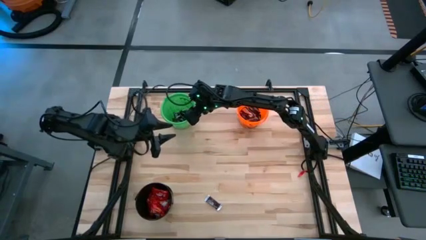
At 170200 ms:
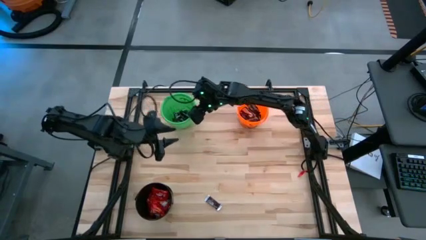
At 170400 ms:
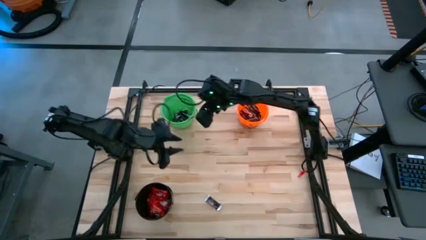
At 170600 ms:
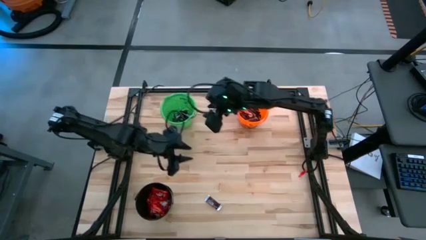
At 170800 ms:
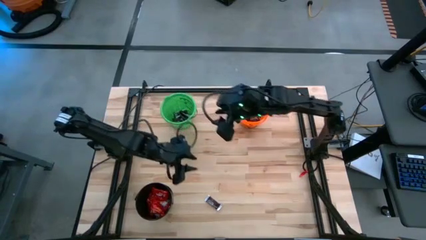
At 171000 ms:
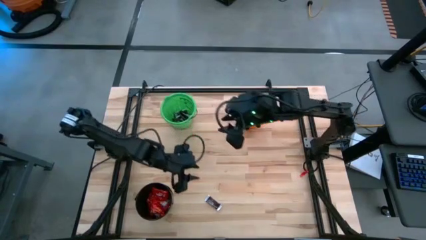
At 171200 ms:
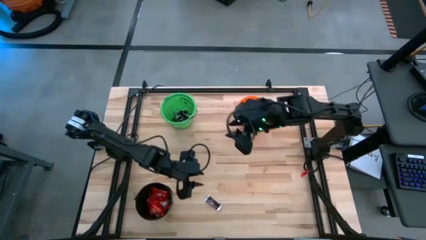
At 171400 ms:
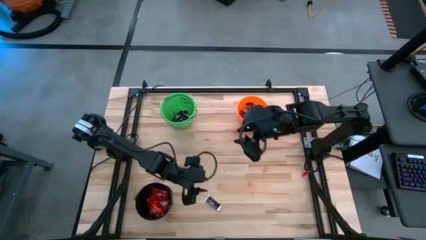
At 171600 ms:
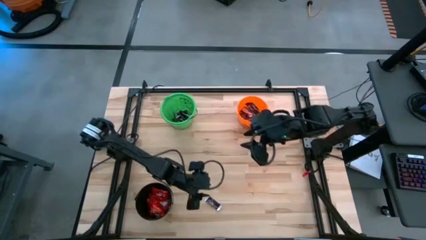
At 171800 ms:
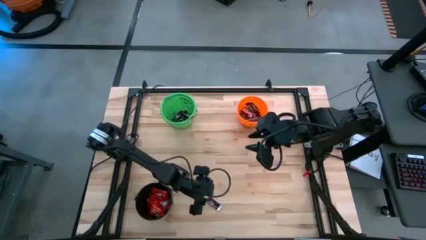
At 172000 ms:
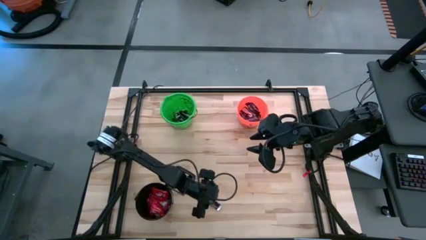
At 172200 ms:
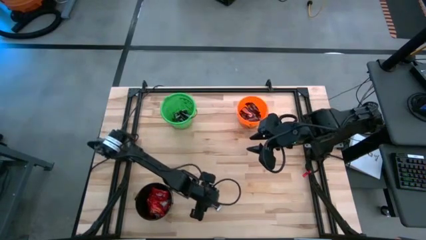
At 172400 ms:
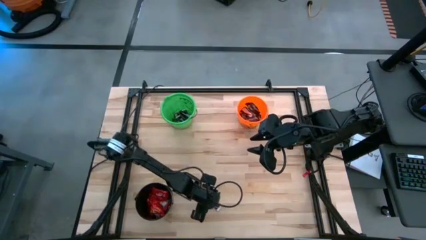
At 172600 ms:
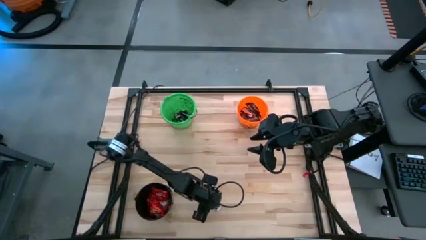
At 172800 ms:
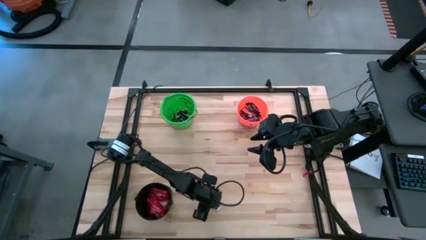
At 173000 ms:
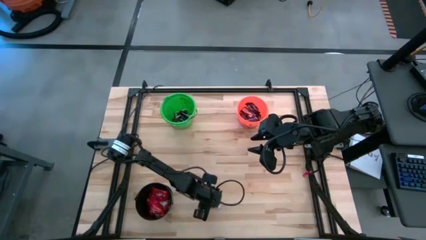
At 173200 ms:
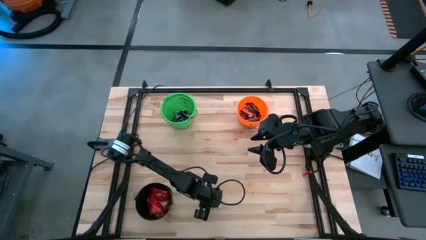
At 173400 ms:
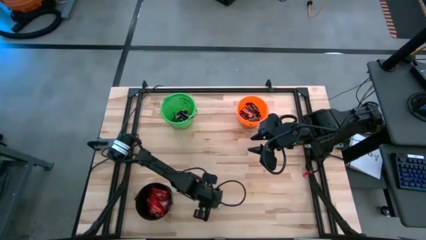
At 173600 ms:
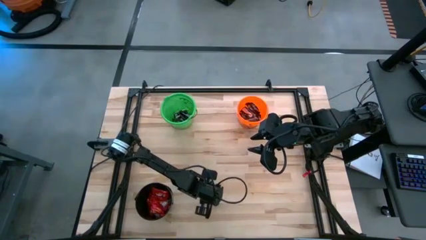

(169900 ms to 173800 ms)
Task: Sort candy
Put the black chocolate into the green bucket

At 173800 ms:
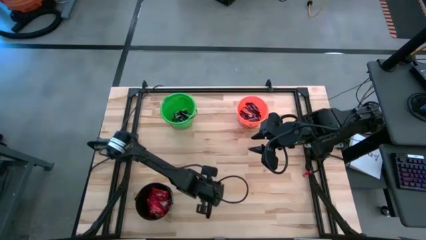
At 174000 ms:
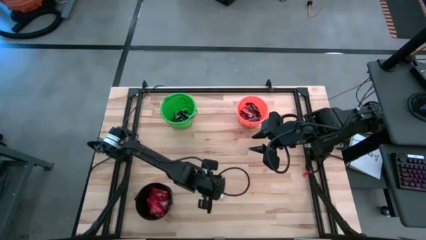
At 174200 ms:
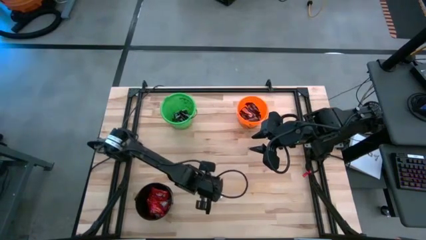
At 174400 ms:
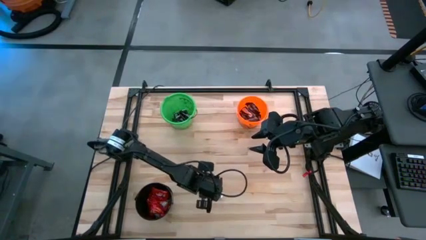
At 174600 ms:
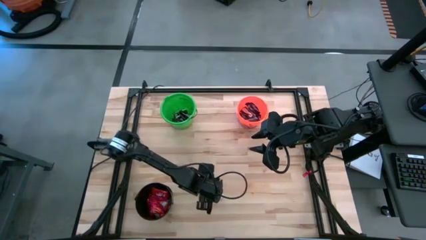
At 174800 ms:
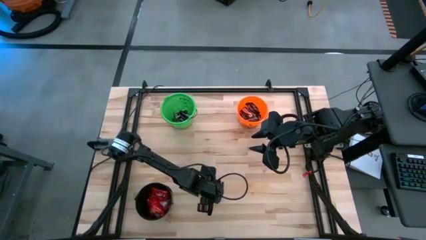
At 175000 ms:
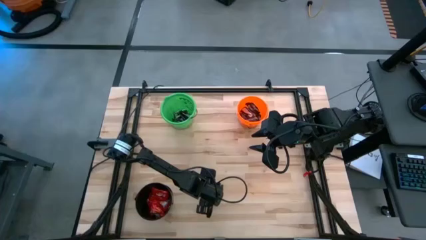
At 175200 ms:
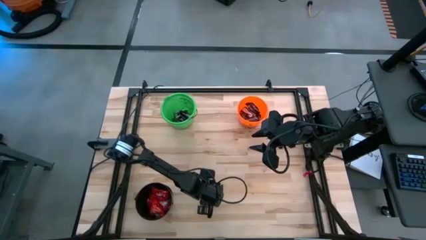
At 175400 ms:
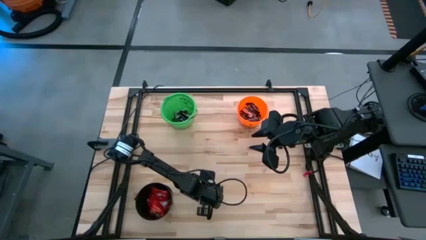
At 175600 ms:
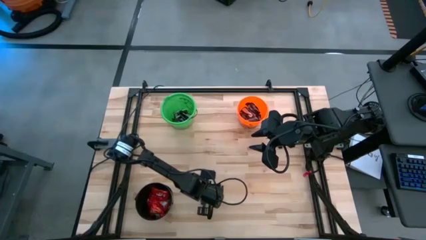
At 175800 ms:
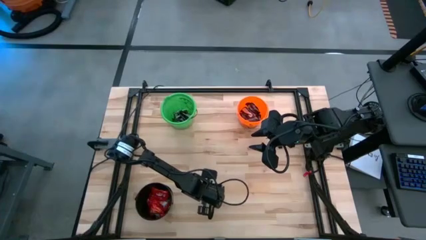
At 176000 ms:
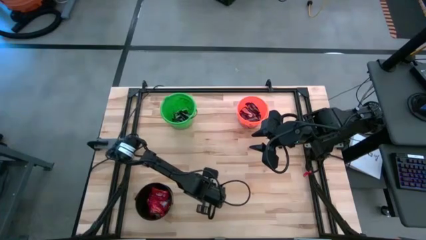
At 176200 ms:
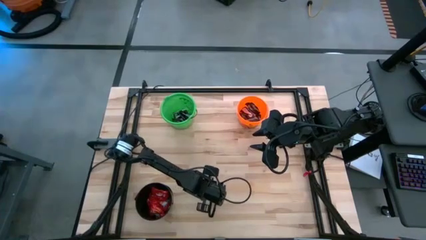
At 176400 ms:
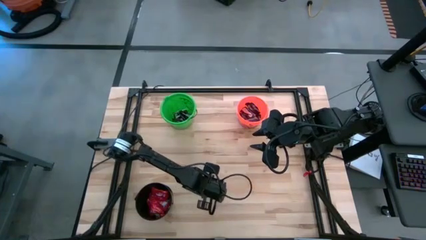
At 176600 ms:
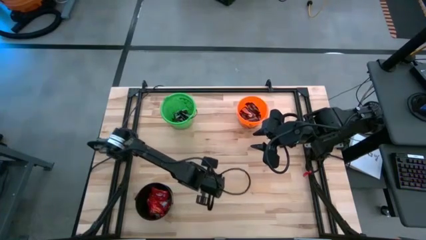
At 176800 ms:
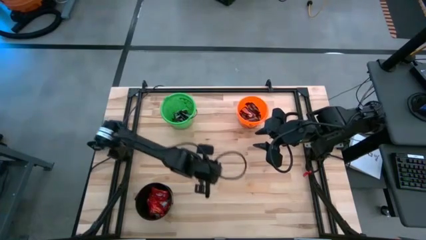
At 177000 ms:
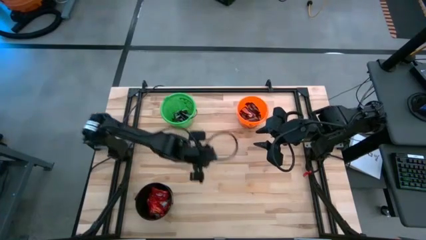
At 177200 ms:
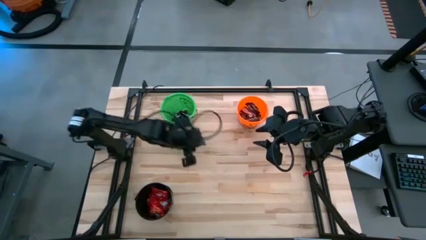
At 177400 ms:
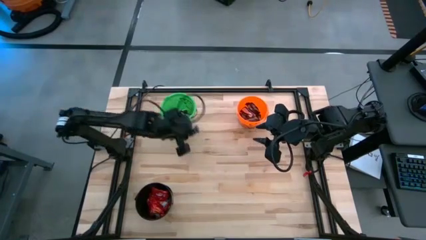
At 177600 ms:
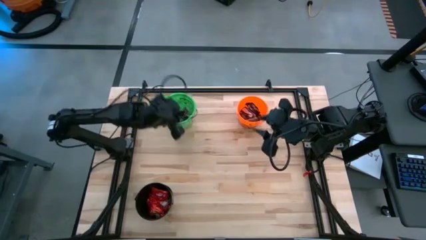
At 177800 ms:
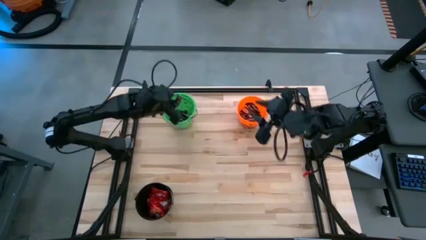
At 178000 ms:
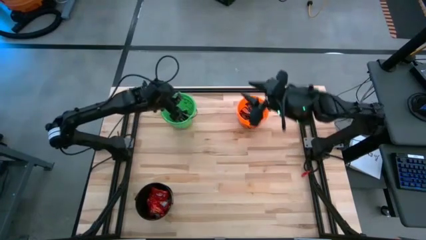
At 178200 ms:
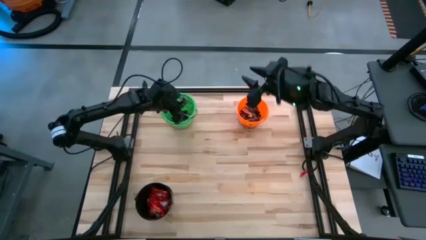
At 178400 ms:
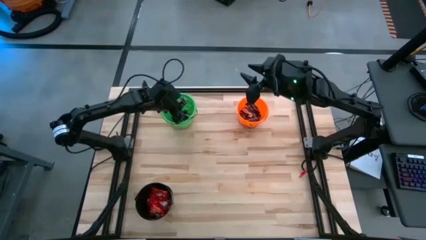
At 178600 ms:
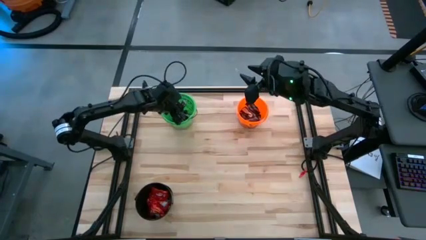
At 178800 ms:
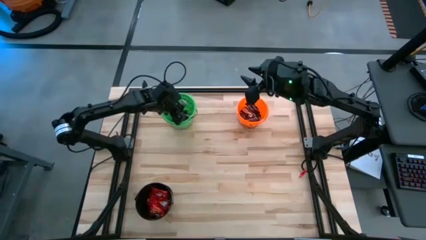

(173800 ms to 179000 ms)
Put the black chocolate into the green bucket

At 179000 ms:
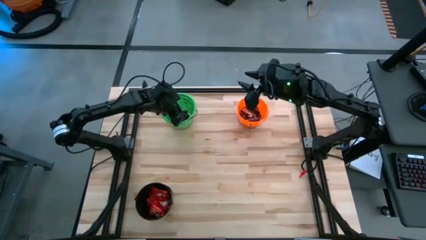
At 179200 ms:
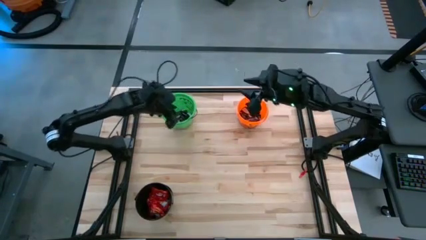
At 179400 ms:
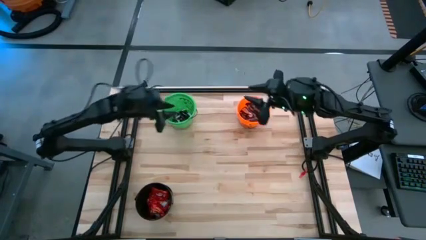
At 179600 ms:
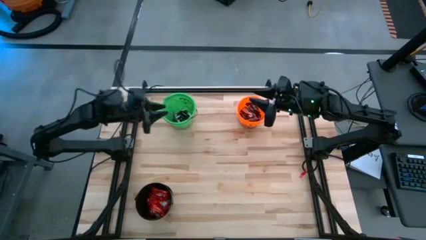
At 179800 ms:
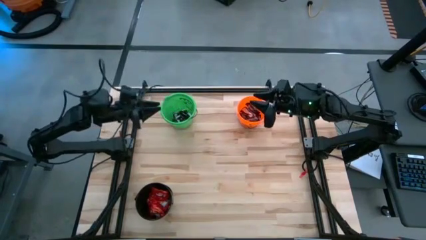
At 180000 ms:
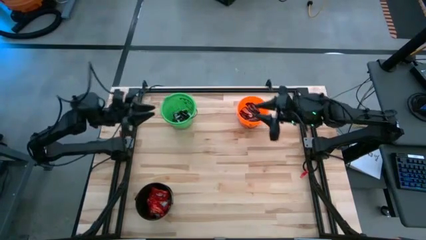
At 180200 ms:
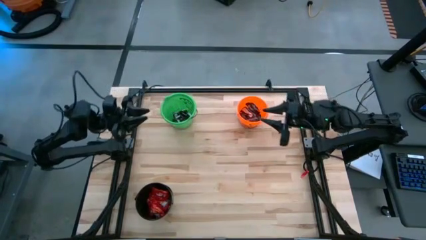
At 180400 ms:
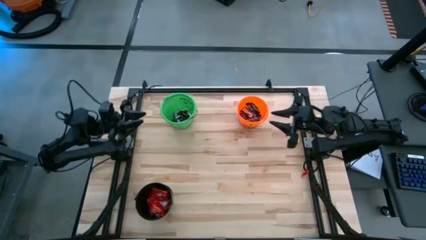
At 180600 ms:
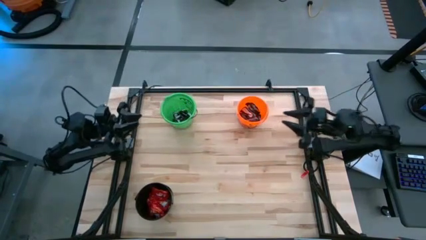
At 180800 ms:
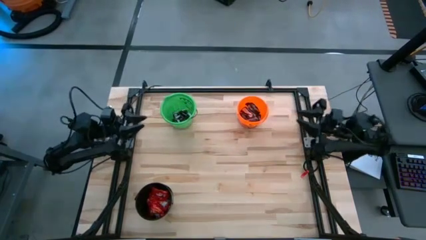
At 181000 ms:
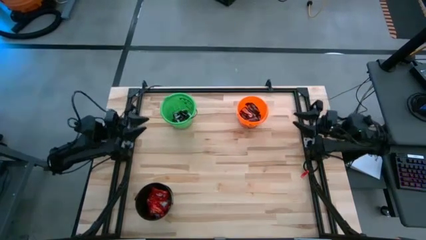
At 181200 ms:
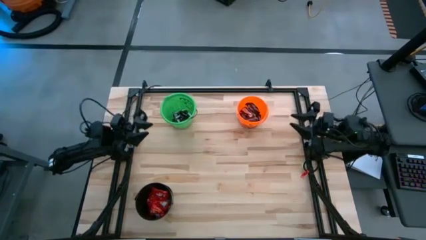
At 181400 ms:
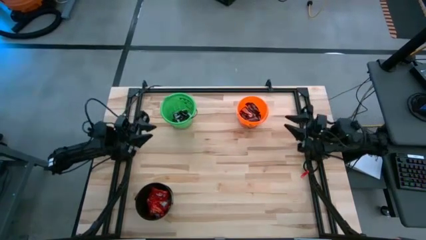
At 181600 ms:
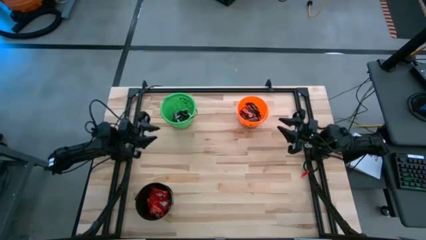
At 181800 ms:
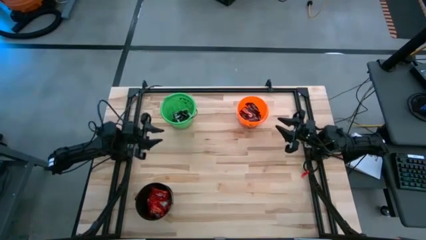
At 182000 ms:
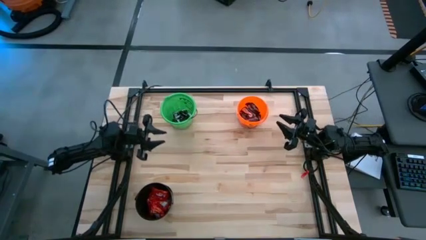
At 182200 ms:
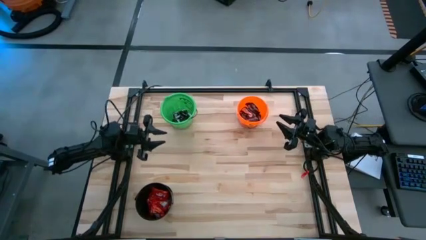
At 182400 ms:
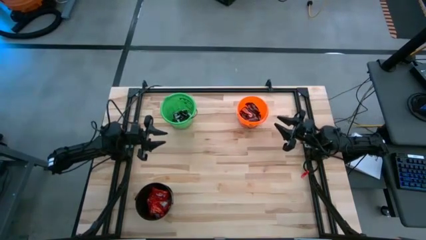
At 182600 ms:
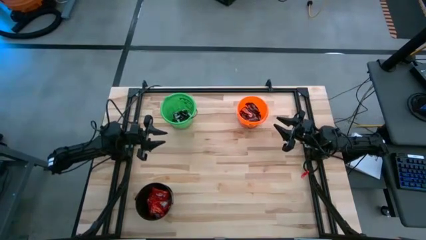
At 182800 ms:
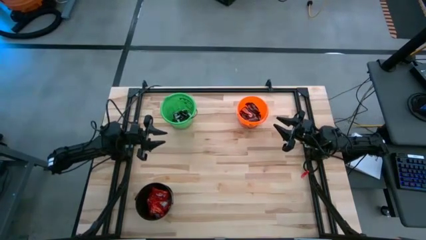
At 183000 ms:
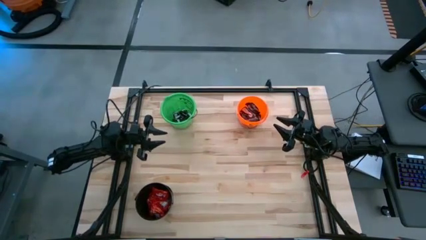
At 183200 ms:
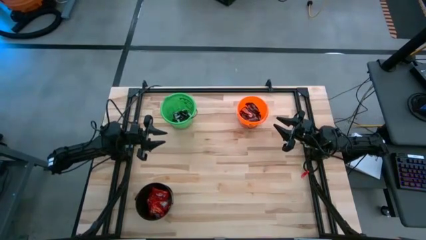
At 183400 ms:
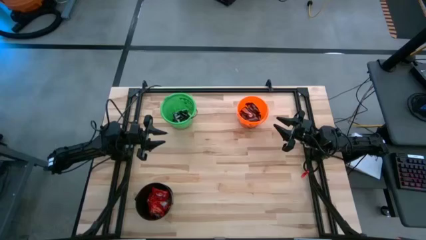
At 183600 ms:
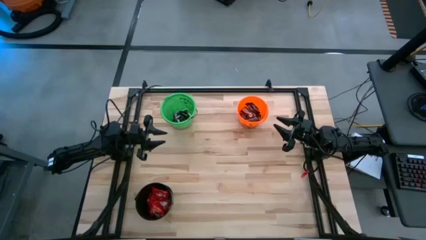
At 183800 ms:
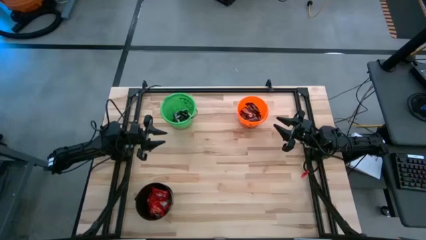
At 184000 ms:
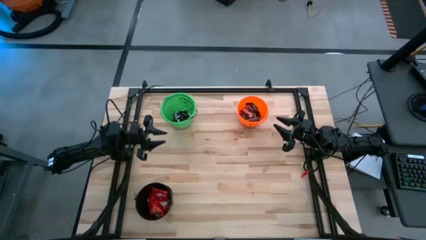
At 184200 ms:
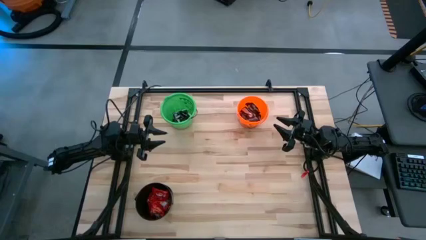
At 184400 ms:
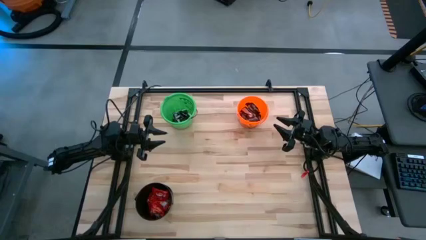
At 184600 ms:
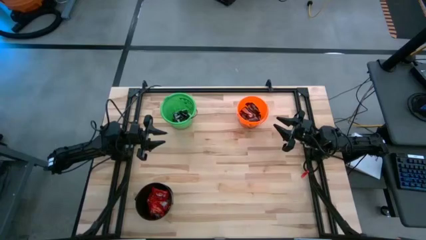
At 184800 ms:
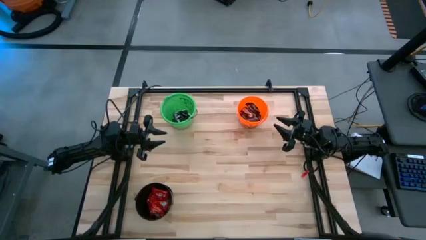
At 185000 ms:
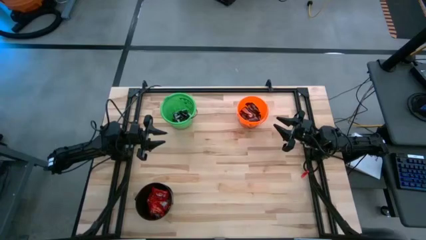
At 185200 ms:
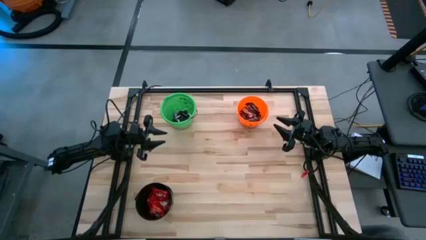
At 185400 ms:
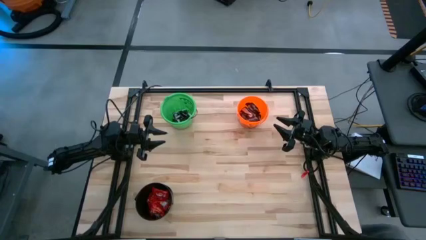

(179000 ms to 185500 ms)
Return to Home Position

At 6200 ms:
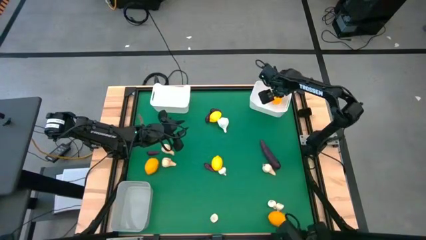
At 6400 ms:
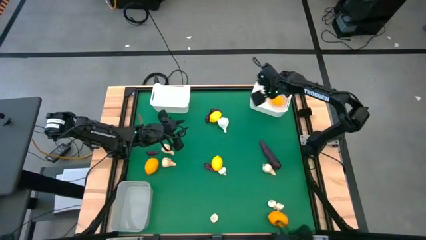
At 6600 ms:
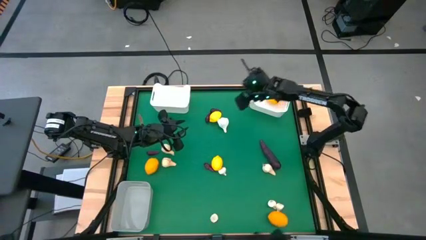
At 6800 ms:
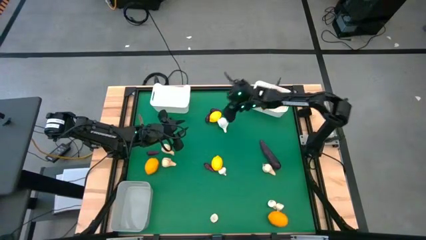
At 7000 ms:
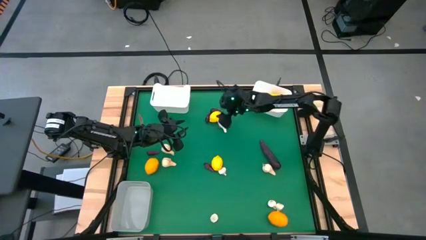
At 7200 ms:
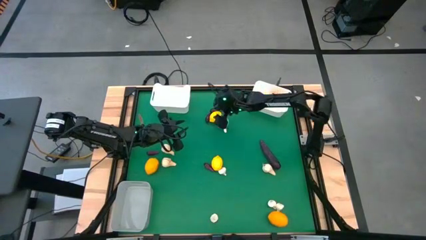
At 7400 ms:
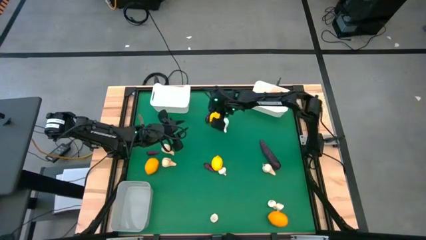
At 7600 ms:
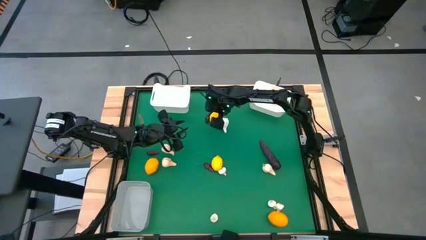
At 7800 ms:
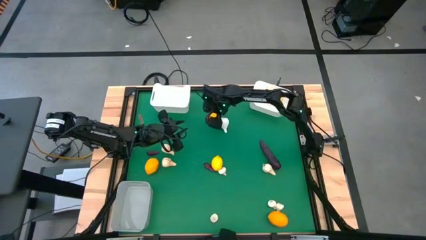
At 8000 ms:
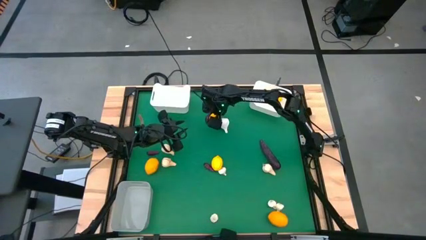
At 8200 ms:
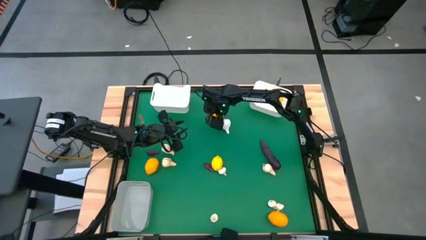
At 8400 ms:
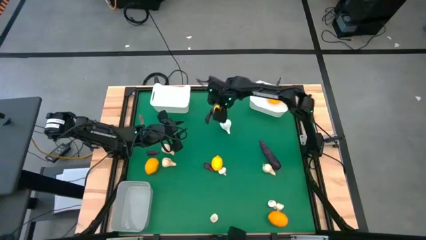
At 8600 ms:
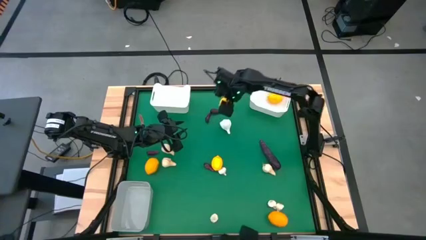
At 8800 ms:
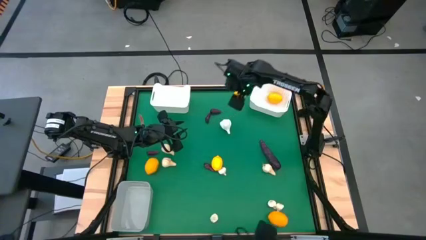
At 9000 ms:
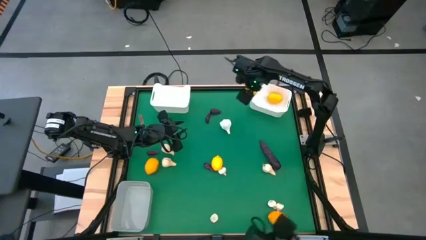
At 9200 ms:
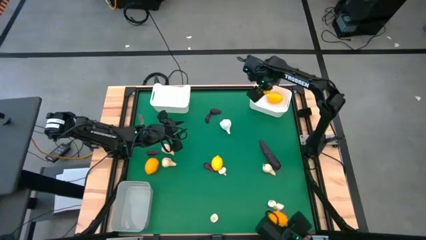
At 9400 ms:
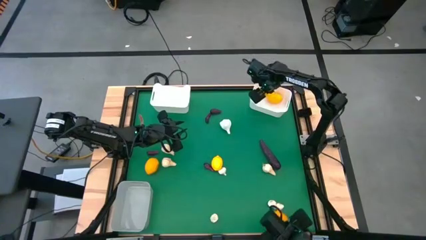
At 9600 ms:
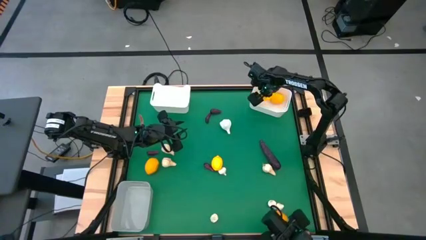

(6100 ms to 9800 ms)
Task: Sort produce into baskets
Put the top yellow lemon into the right white bin
